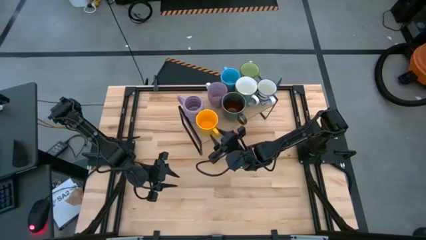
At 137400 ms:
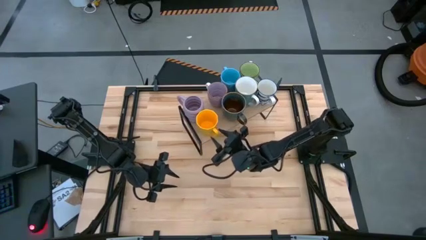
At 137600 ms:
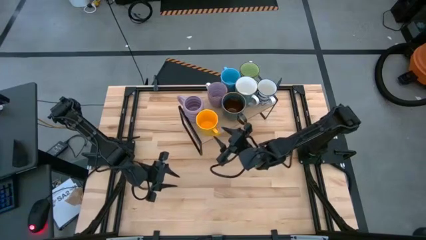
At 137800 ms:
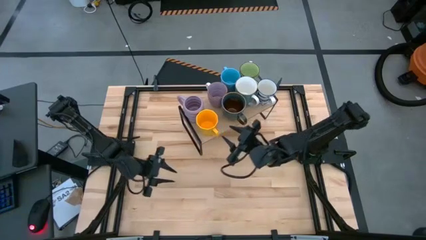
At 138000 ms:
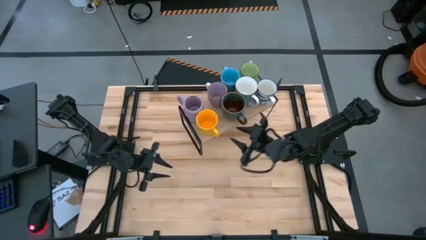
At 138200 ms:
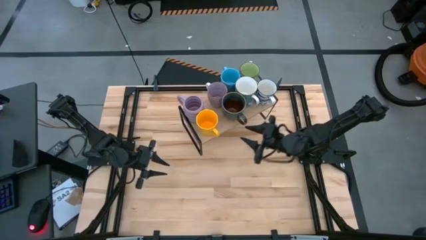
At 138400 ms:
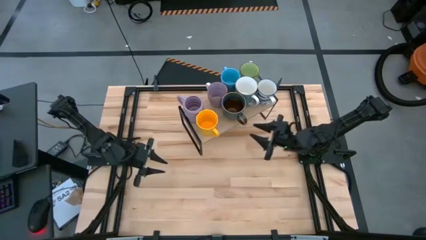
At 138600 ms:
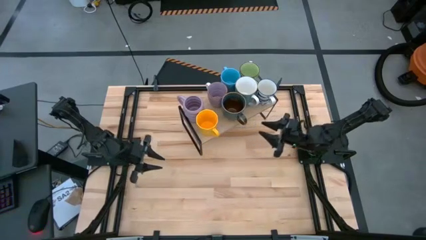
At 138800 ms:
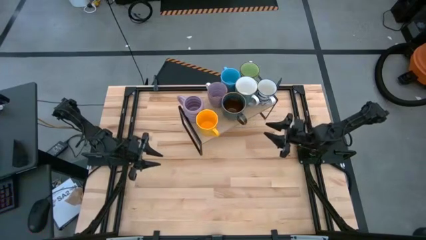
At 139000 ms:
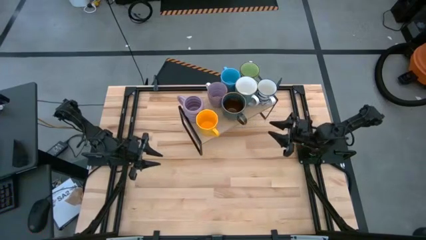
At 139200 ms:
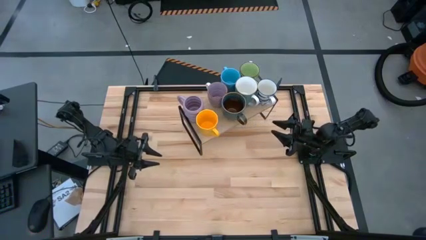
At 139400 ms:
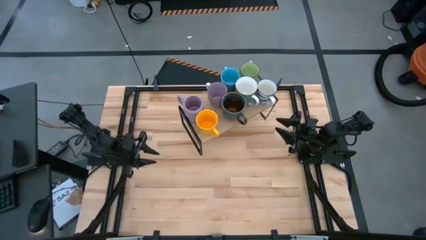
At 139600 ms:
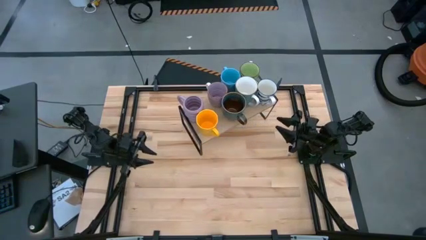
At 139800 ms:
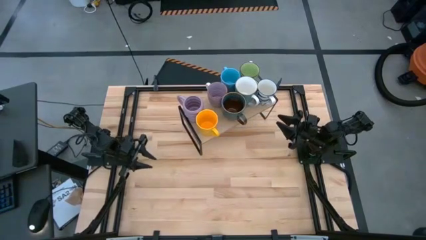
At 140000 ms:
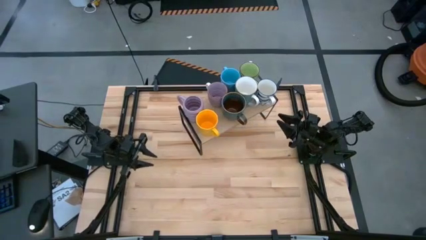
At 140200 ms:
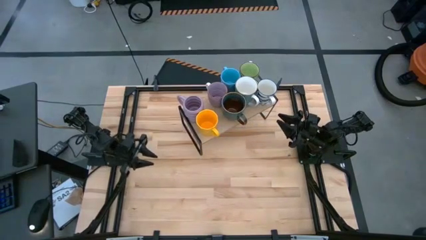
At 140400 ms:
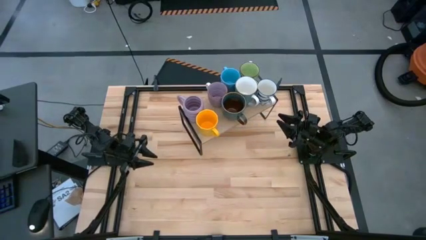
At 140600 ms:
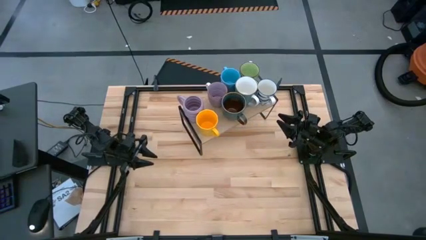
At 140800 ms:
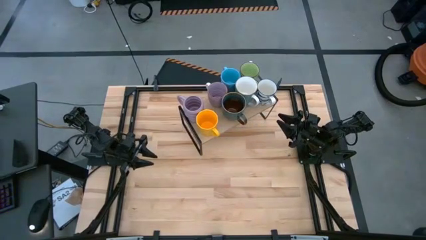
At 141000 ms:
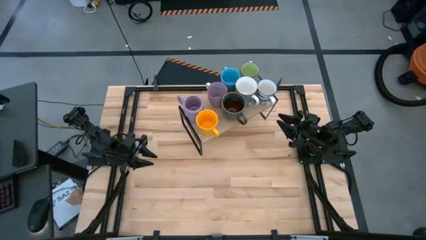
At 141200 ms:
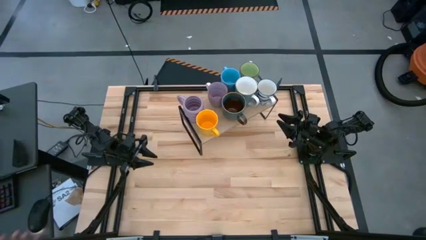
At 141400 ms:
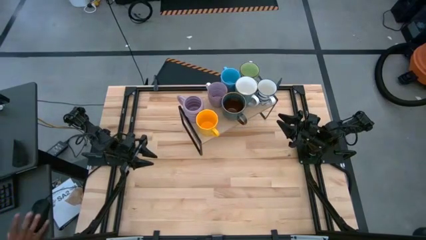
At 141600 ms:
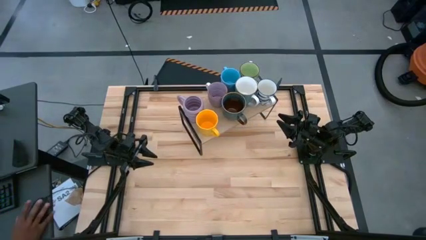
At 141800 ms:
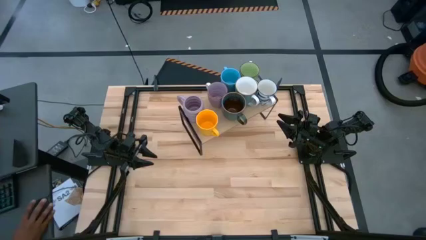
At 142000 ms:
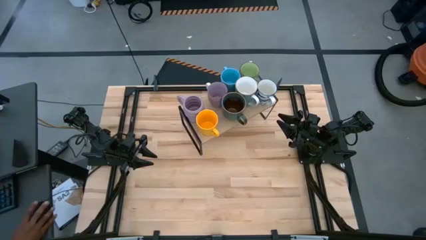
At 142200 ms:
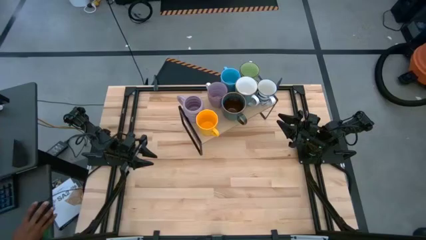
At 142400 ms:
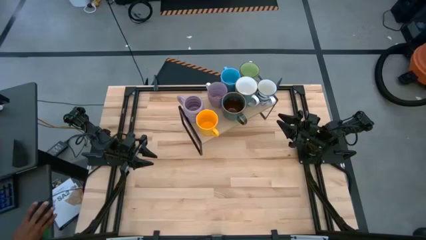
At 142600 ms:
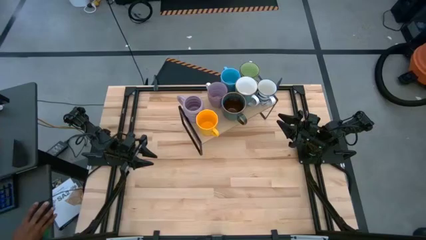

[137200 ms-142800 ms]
Task: Place coffee mugs
Return to Home Position

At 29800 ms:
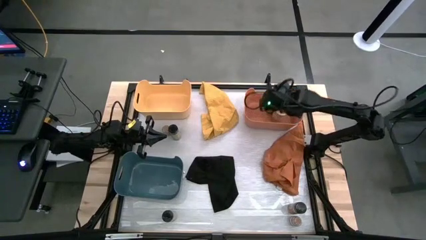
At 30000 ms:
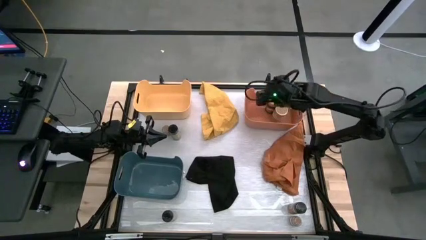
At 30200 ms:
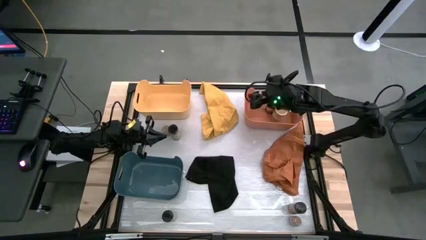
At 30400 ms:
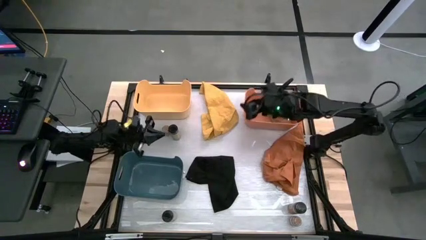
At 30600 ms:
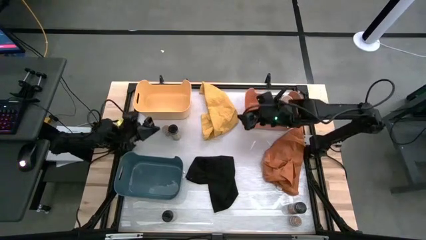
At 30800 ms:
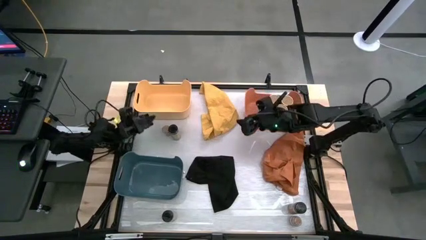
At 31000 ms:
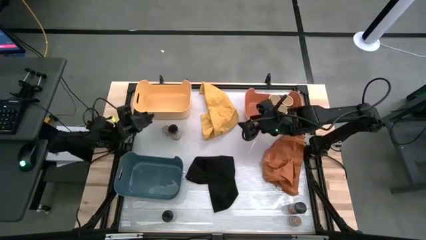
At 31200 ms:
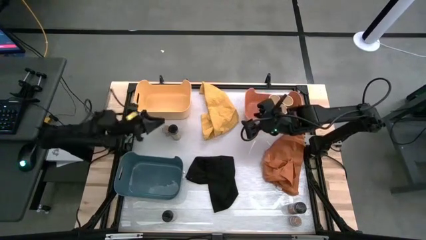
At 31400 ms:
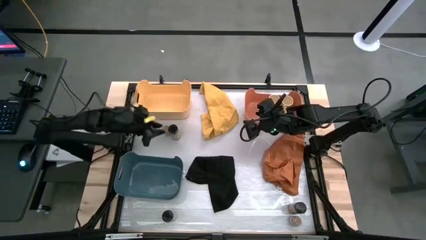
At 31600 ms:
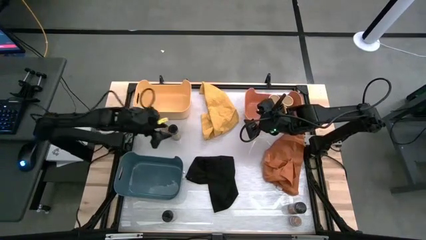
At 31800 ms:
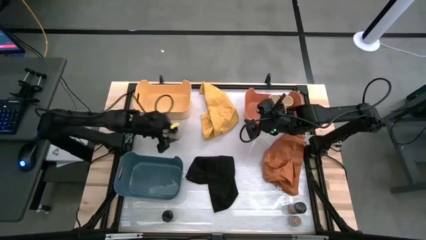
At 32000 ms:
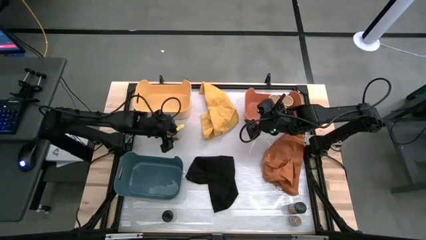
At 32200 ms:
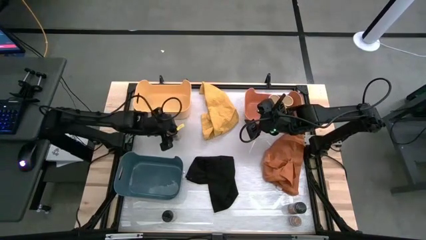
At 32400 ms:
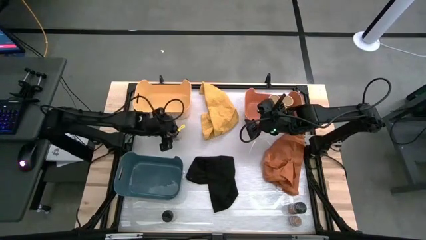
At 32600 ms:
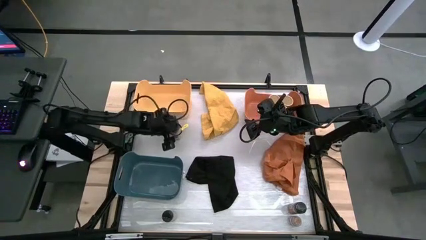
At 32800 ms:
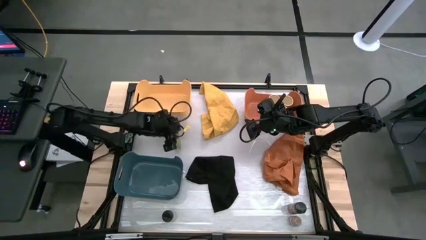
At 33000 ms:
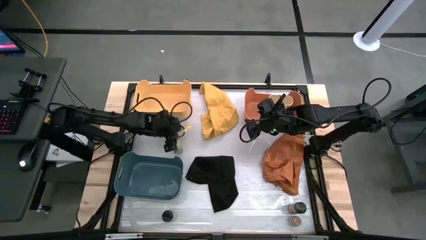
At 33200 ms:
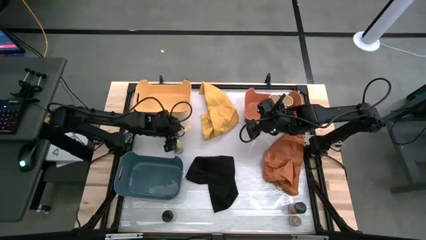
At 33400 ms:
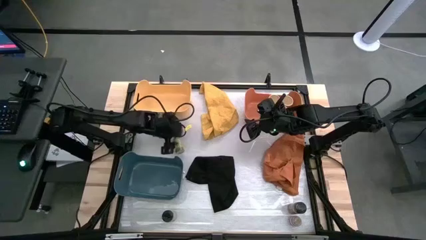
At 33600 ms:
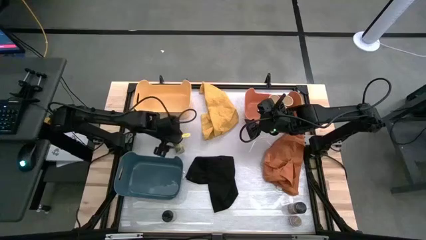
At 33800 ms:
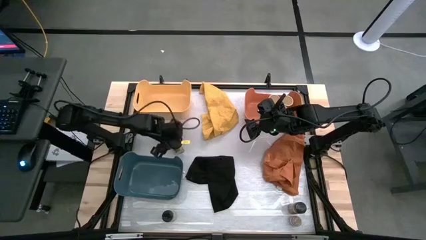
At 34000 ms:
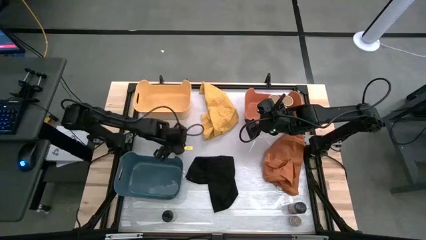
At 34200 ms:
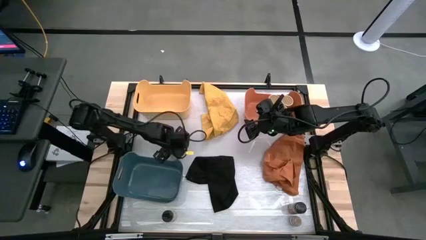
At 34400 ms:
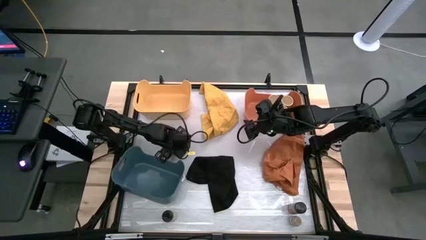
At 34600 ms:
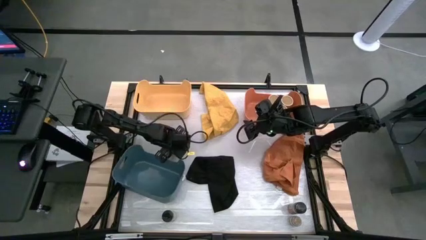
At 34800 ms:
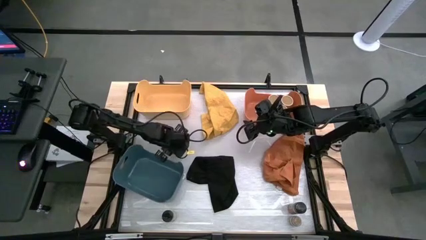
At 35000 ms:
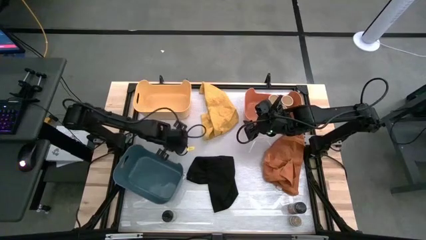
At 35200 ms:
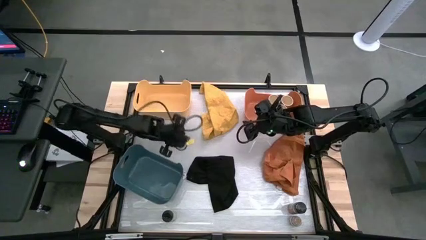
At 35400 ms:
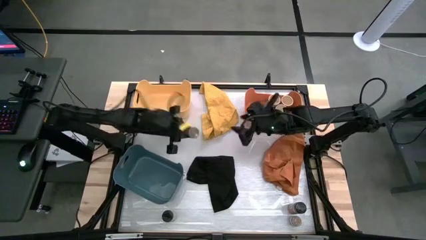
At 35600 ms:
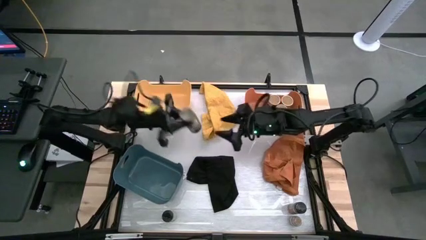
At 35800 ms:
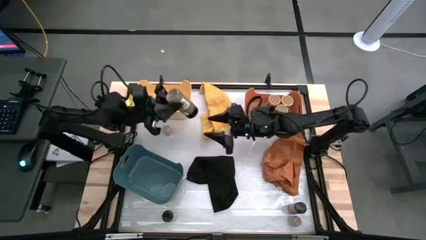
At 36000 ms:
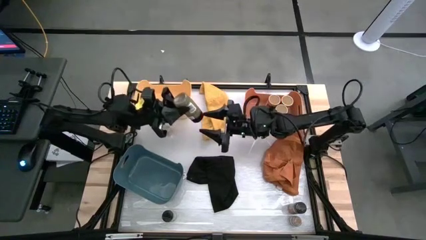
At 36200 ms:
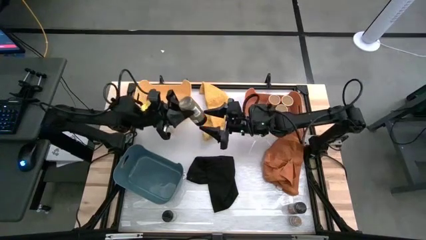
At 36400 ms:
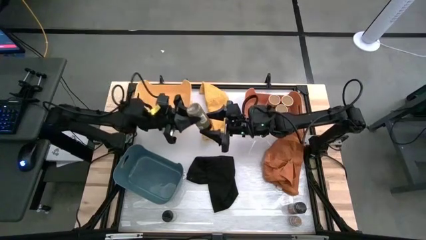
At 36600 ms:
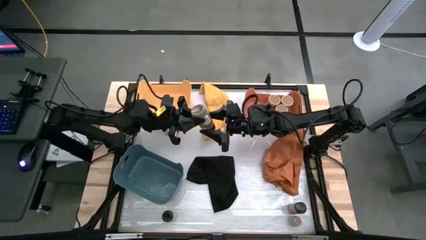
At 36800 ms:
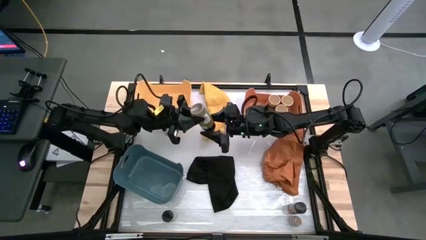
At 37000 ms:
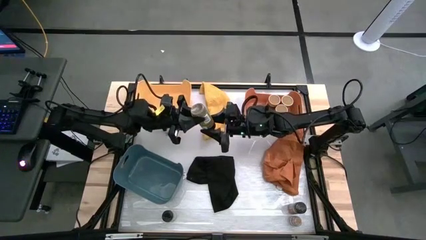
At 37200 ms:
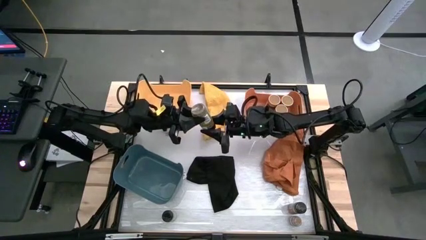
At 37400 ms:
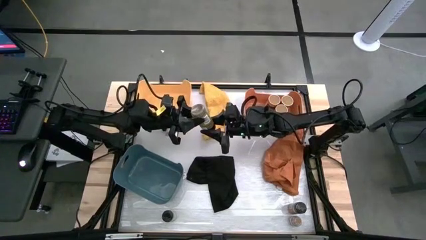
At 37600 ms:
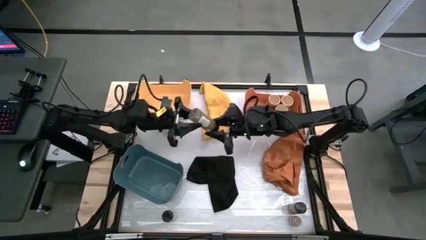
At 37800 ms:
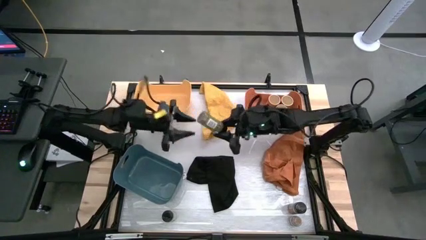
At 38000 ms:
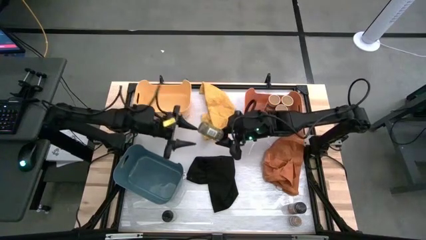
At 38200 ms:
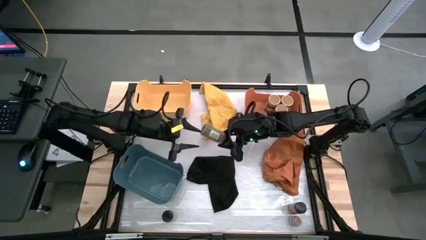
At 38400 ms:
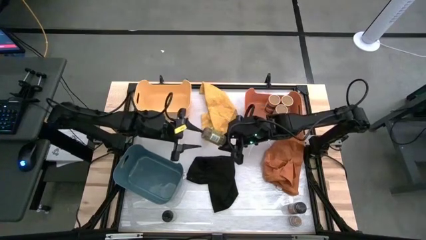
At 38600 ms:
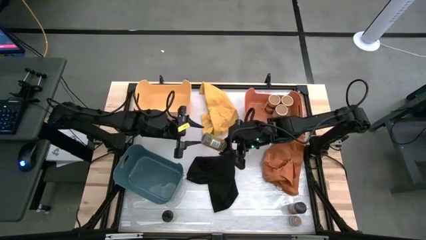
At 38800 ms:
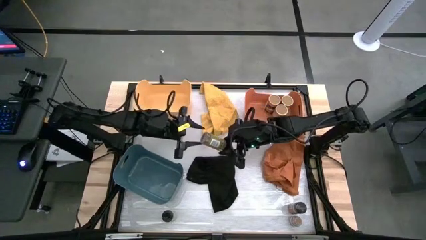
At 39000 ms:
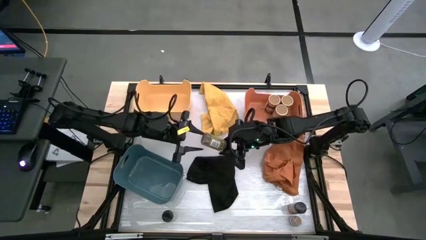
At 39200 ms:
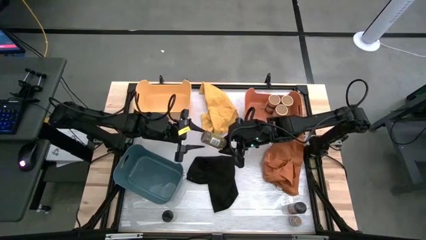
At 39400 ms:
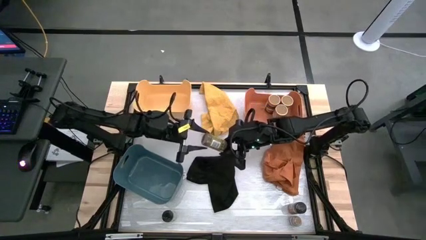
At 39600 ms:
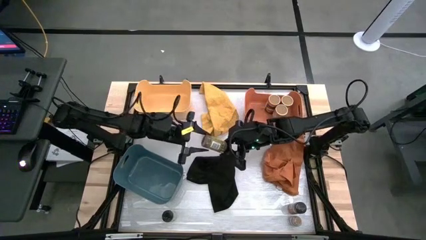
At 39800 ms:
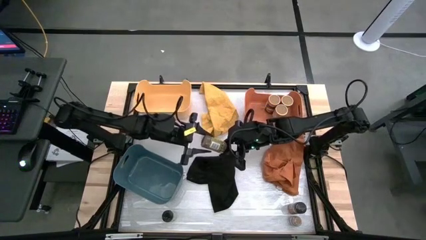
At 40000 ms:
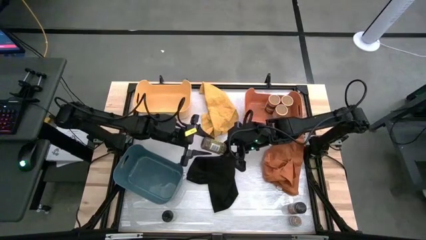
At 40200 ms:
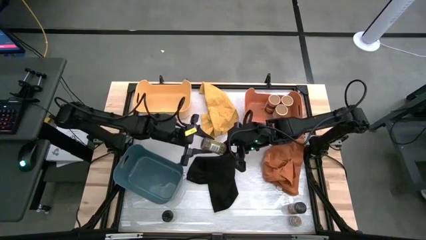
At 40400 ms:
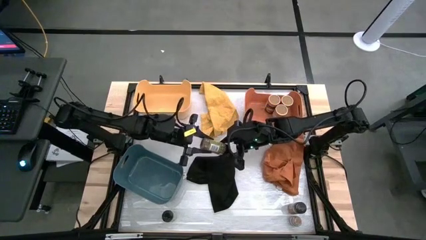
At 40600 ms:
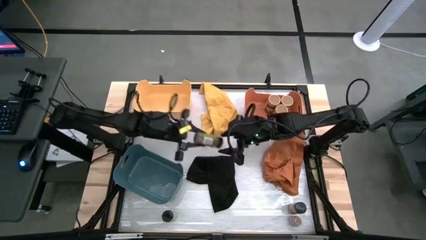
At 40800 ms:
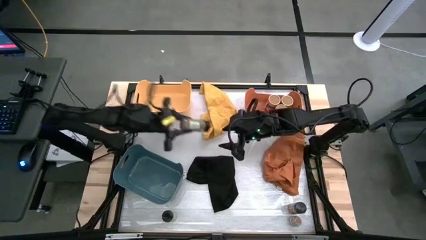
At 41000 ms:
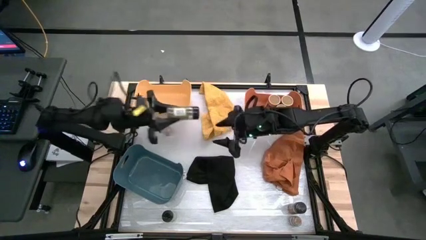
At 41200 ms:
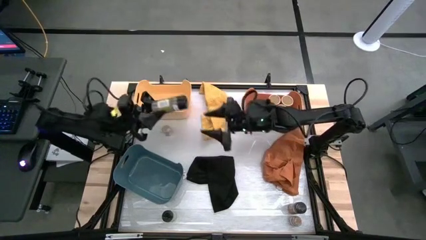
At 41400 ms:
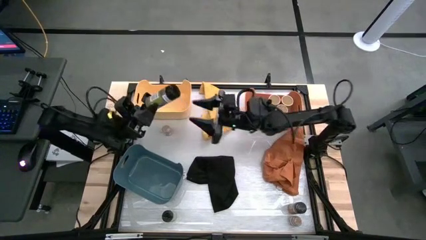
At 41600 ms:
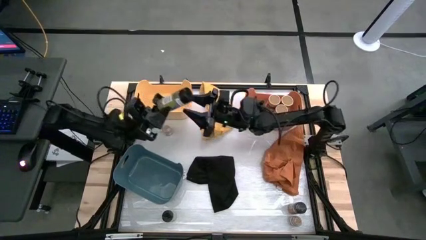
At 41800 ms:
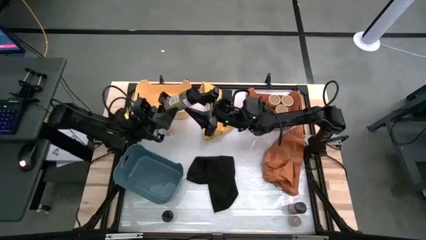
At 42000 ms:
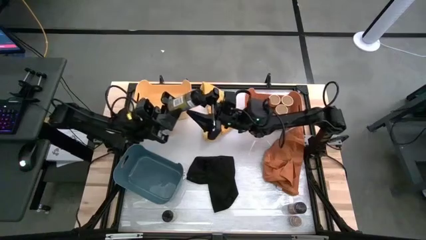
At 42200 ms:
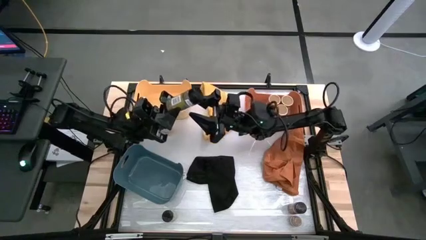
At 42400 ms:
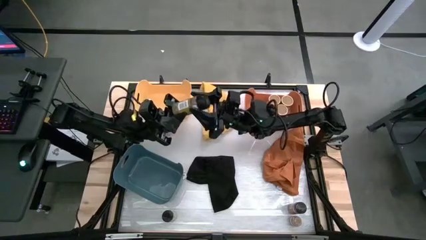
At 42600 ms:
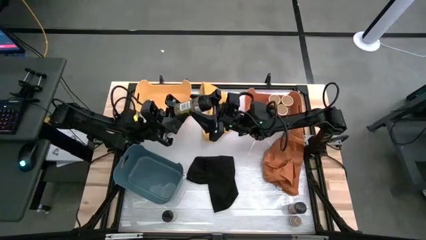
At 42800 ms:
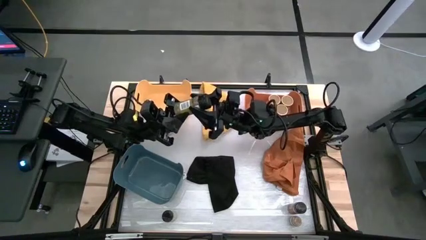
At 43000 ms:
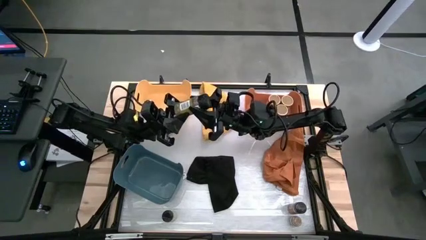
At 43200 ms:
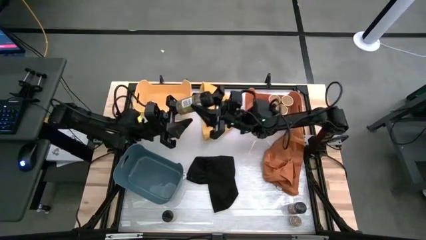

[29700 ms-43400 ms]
Task: Sort spices by type
Put the top black spice bottle into the yellow bin
